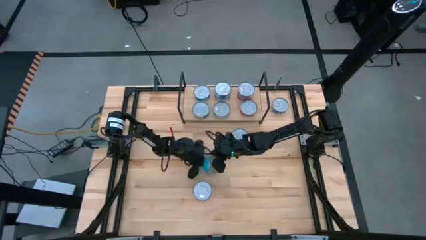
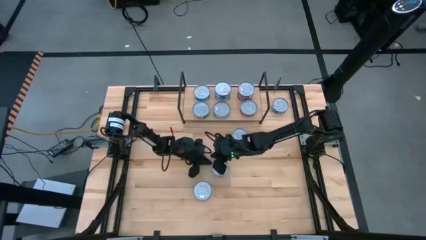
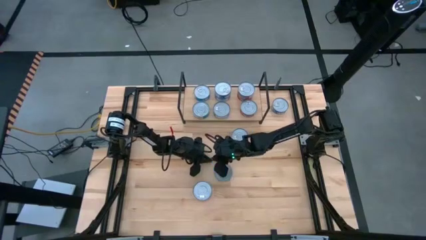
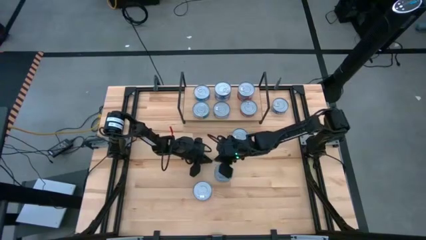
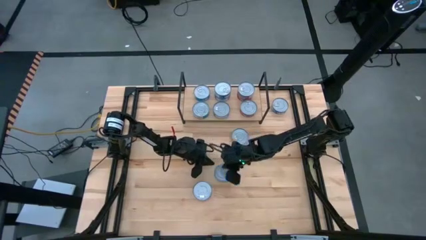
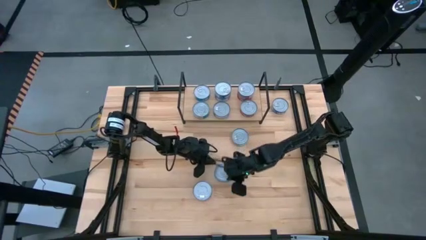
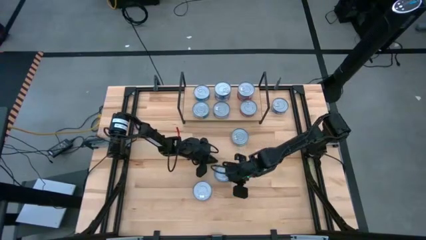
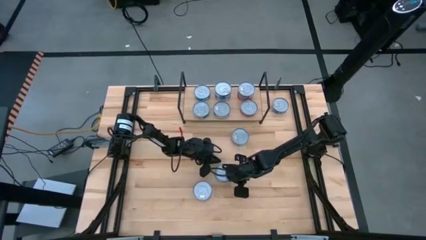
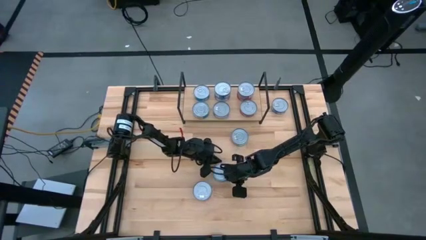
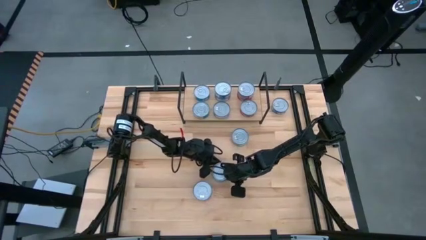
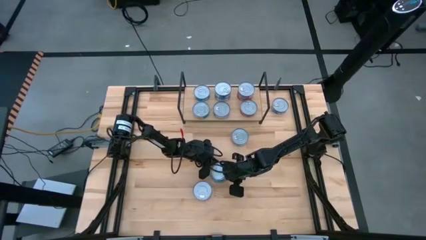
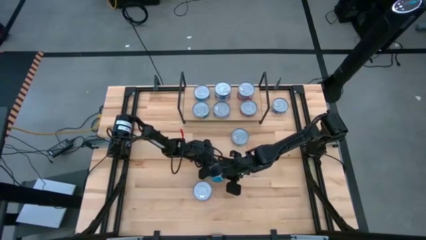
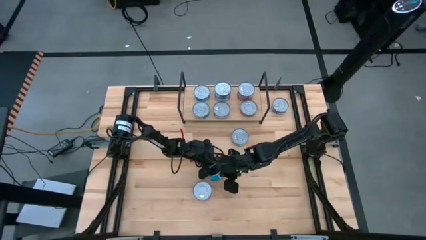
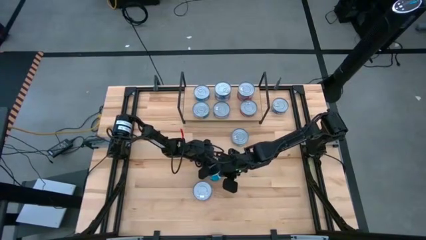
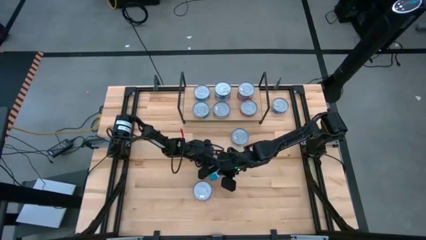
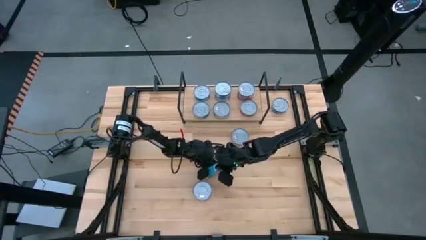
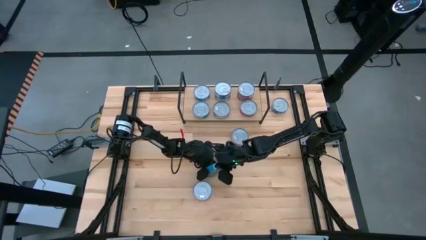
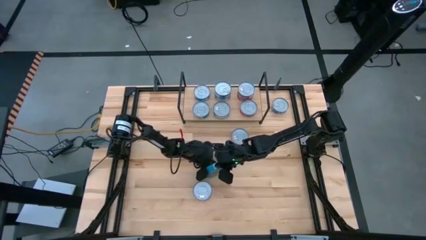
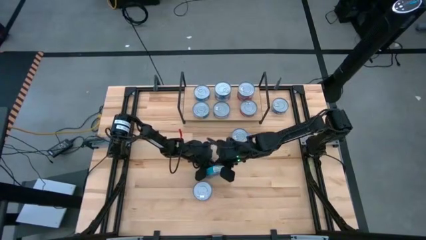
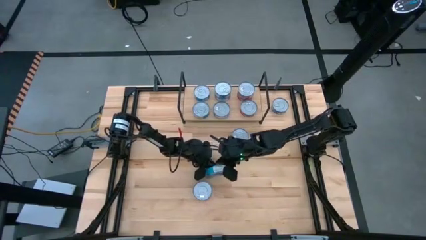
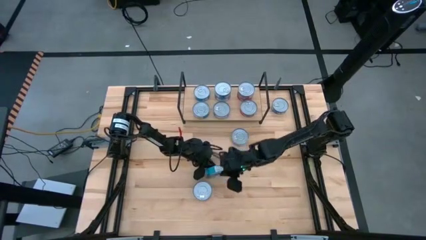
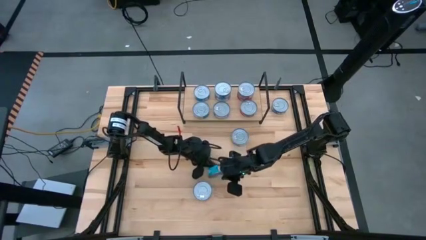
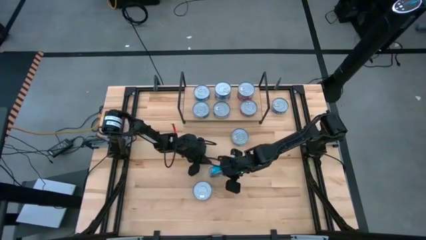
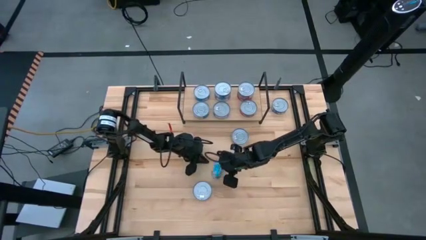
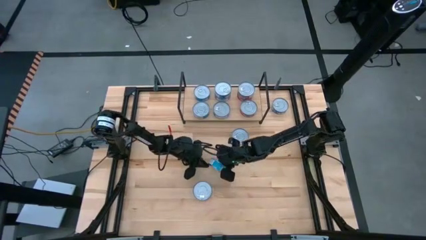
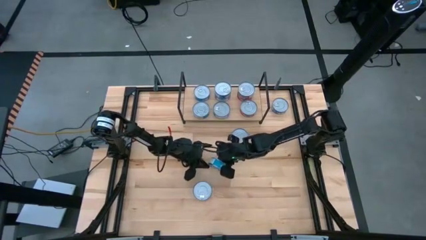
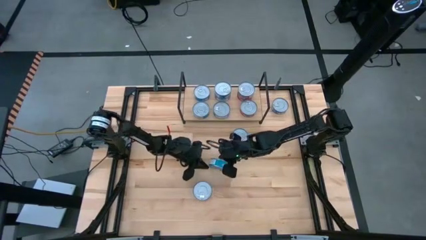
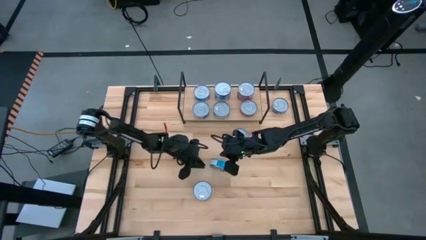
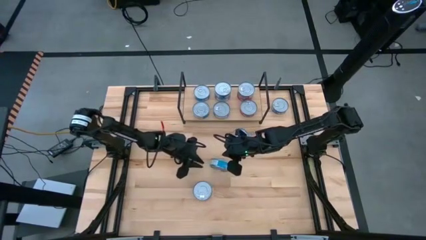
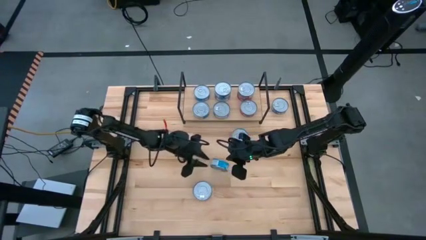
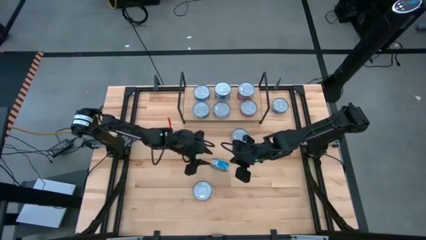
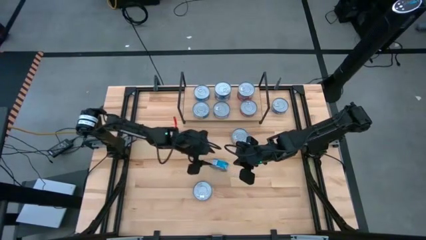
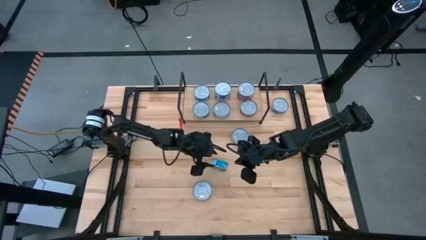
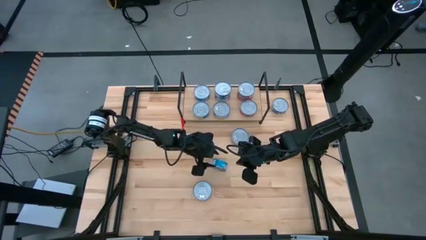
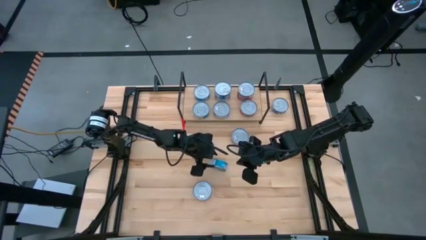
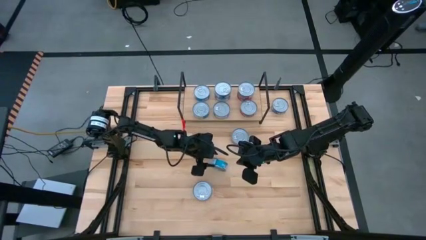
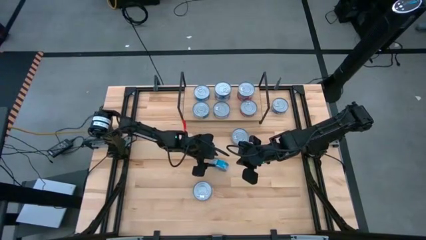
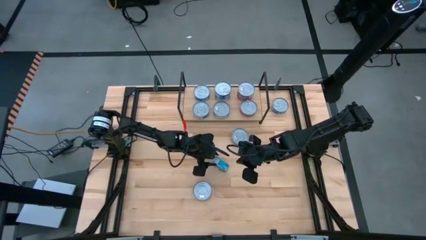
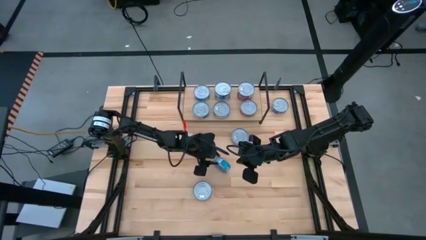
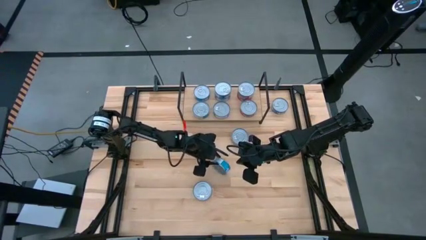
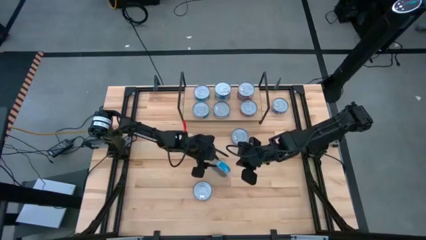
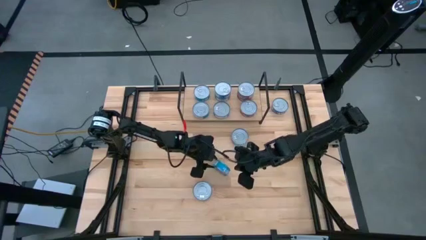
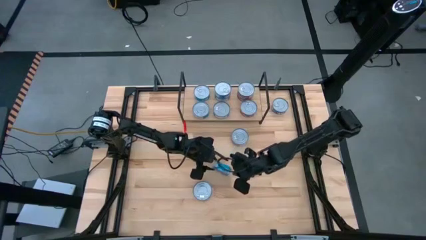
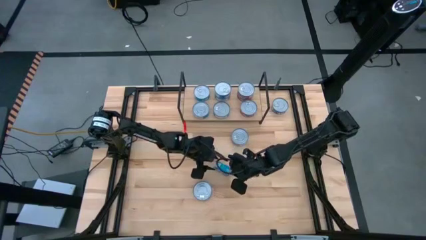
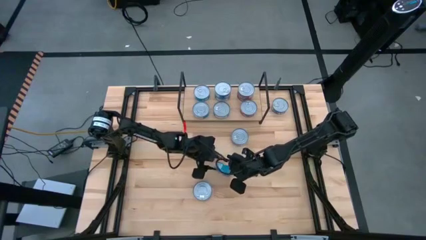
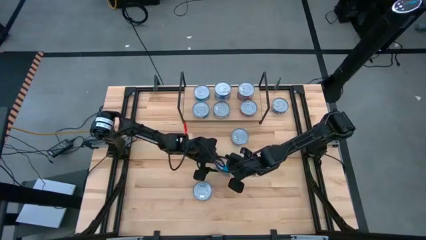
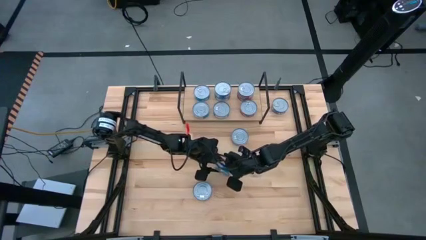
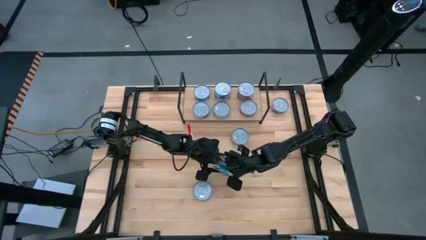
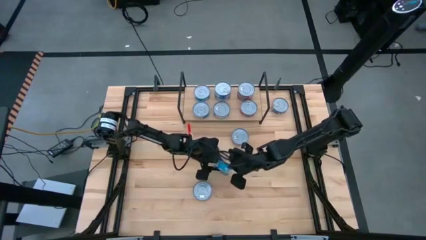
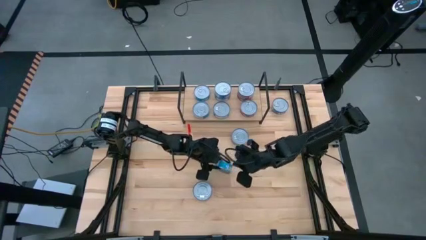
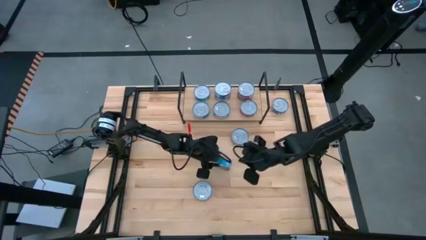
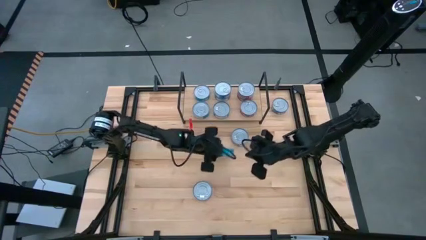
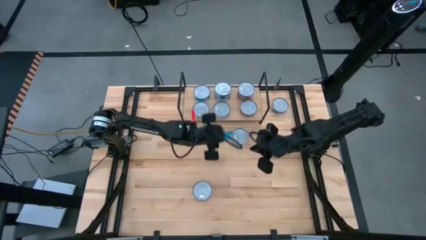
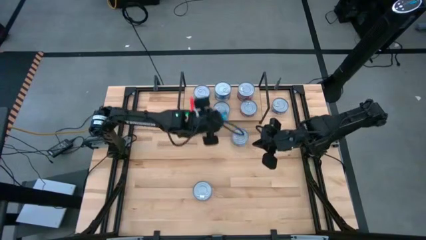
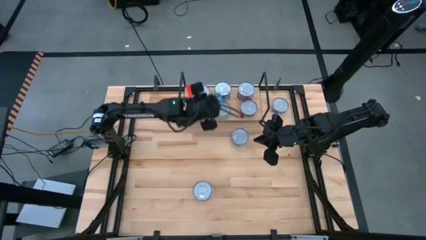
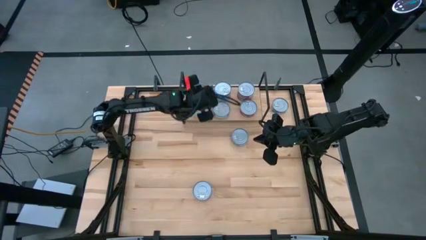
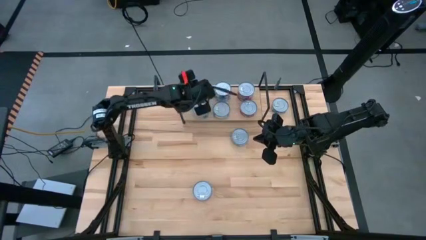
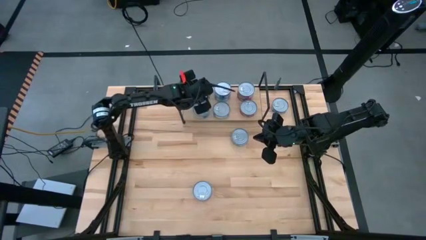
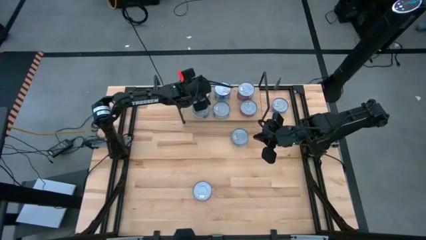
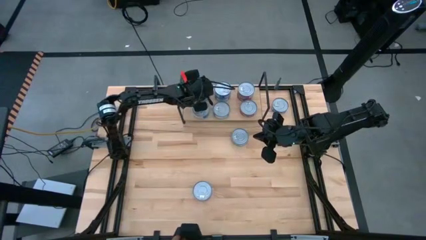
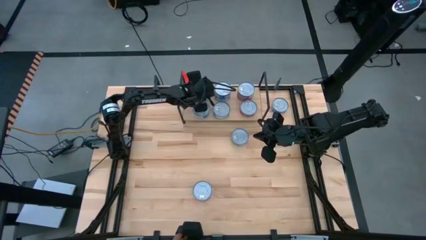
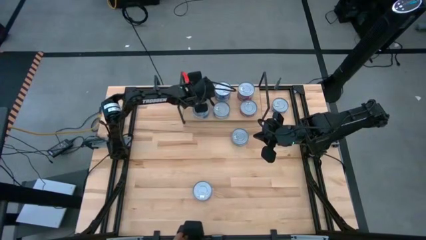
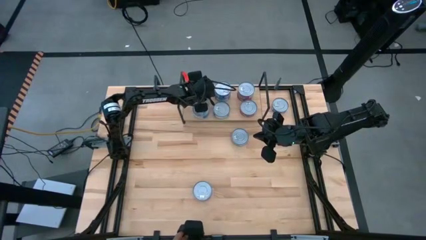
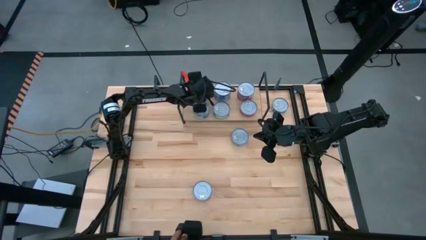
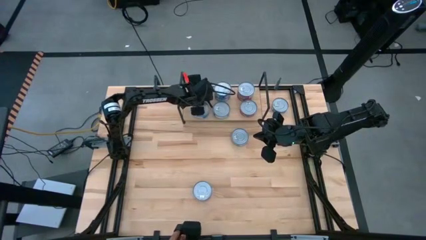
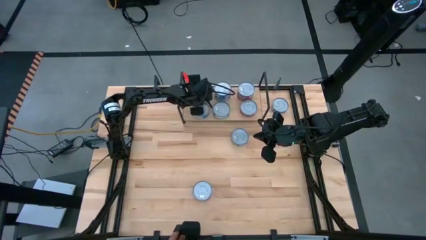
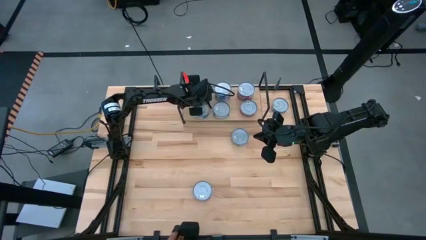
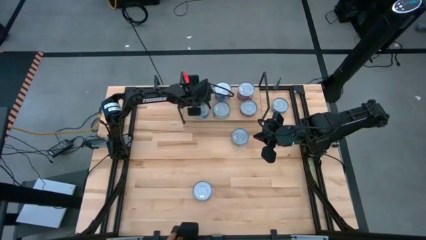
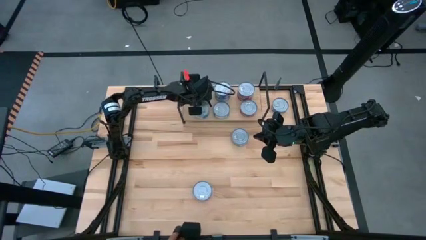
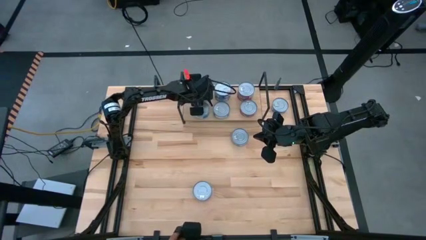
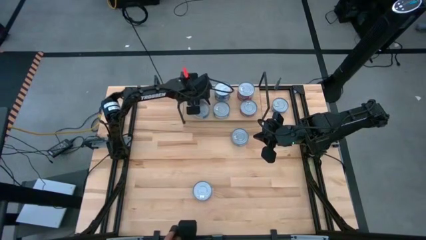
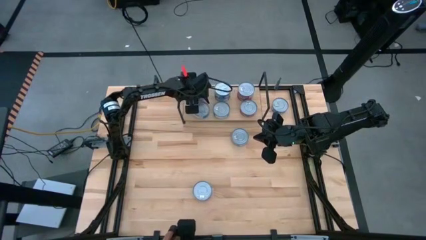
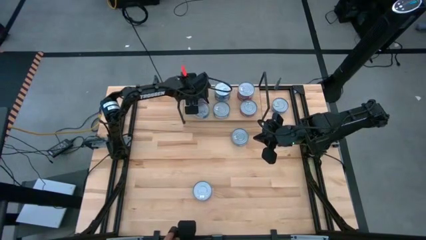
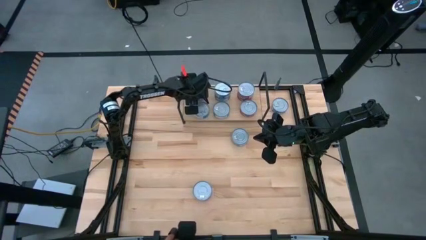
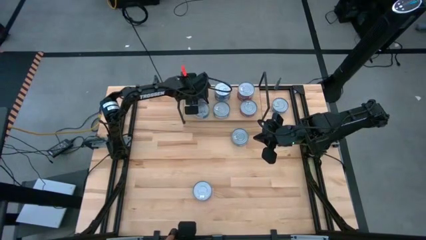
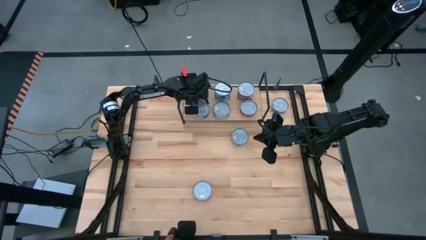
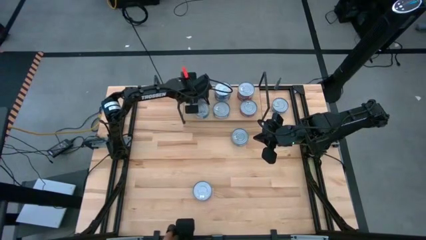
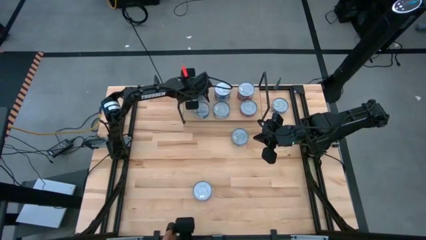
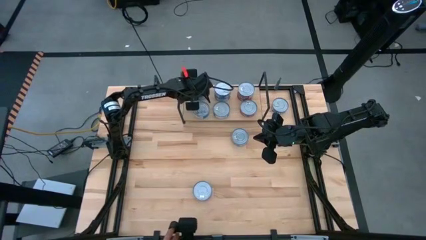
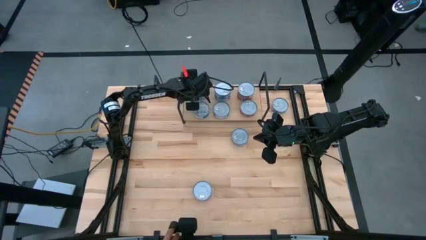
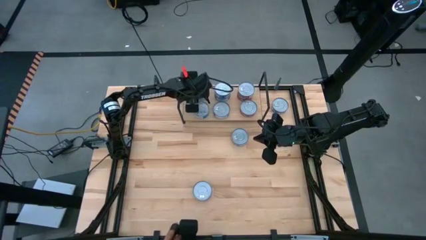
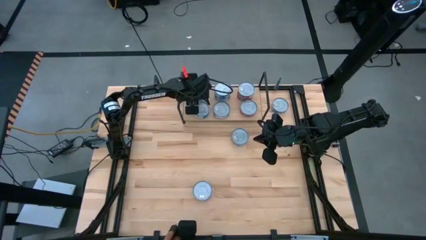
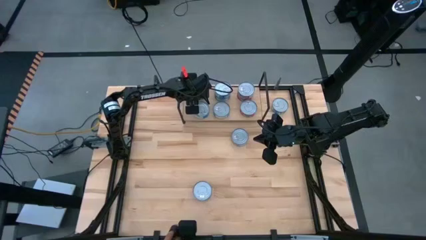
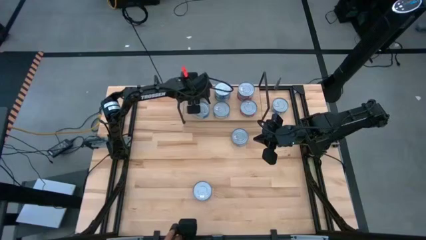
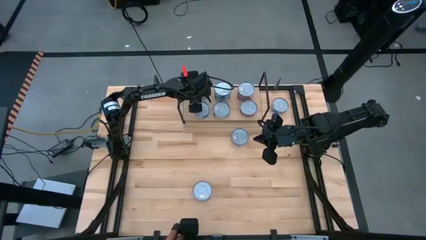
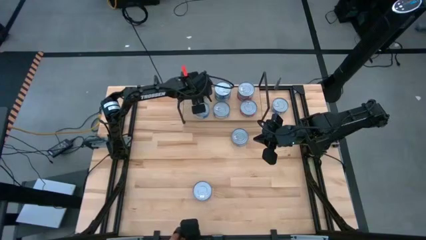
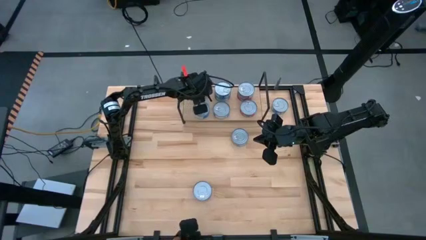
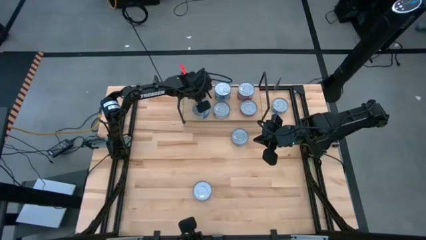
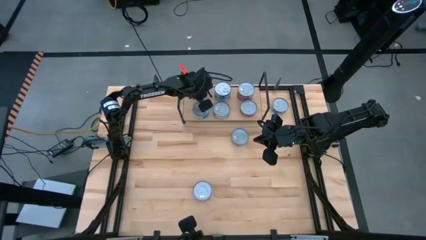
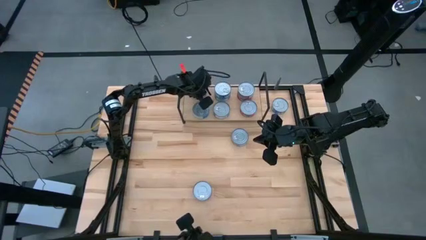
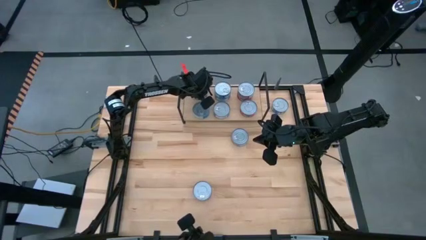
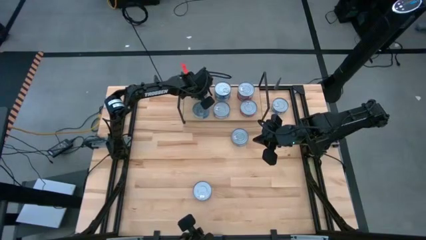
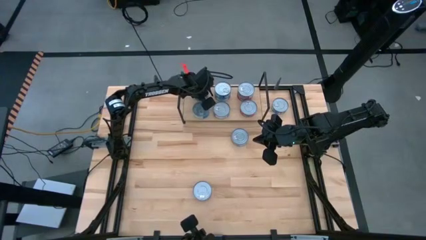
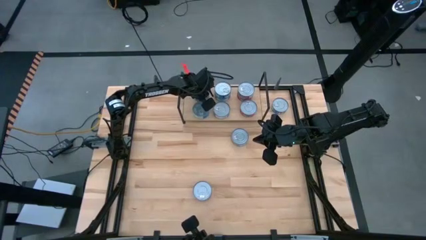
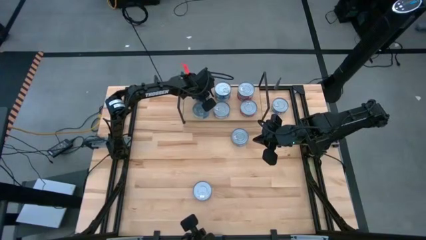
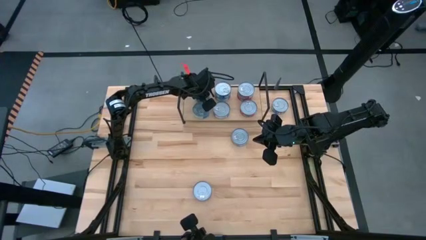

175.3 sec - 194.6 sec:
Task: Stack canned seafood by type on shelf
Stack the yellow-blue tuna can on top of the yellow-blue tuna can on the shelf
